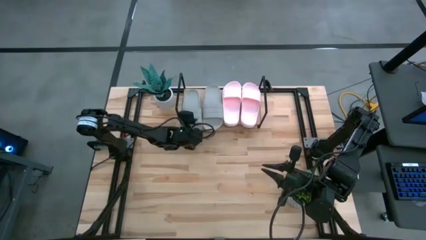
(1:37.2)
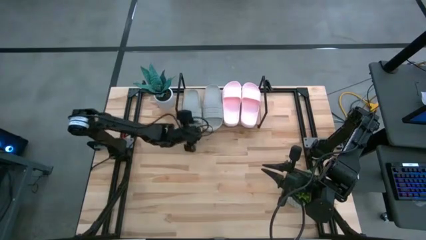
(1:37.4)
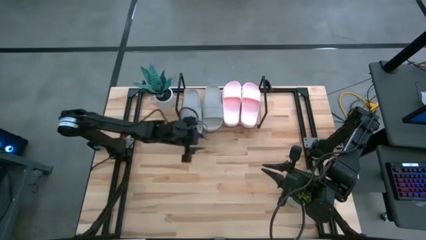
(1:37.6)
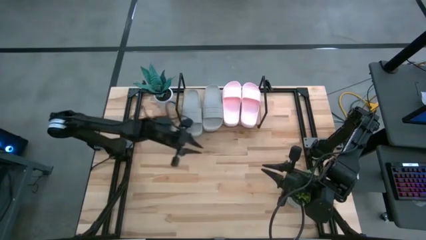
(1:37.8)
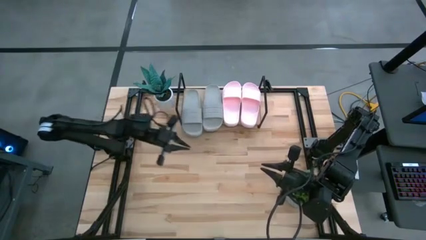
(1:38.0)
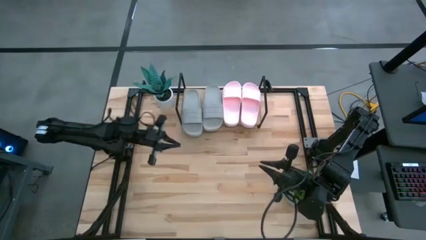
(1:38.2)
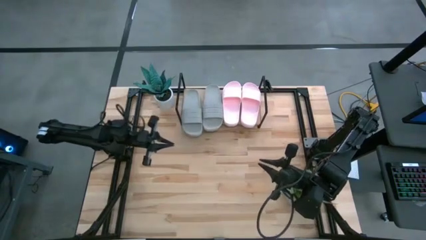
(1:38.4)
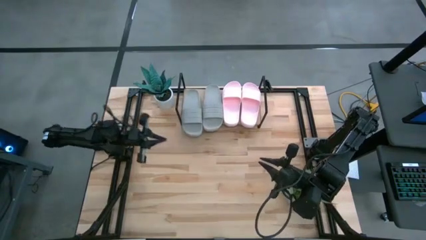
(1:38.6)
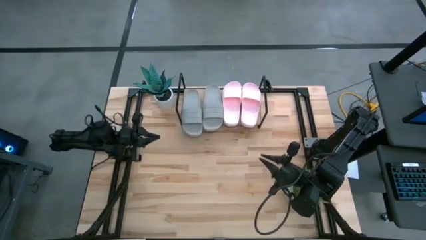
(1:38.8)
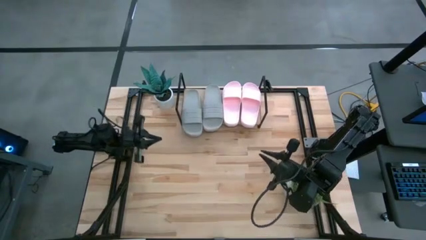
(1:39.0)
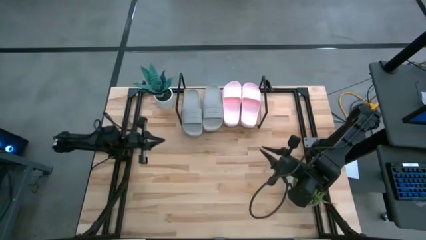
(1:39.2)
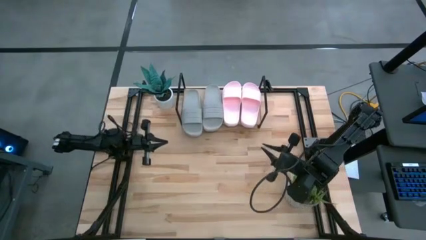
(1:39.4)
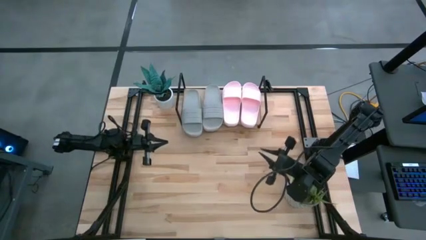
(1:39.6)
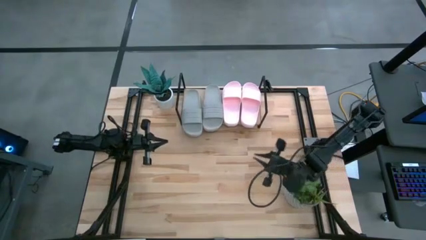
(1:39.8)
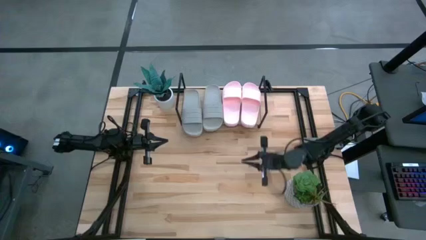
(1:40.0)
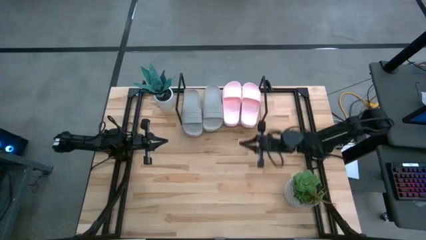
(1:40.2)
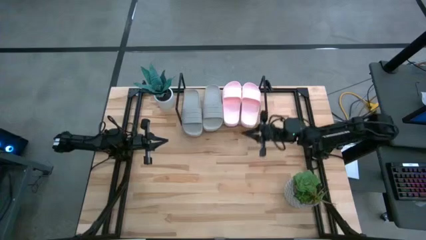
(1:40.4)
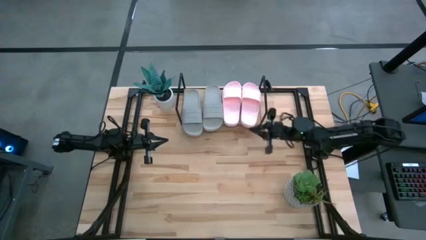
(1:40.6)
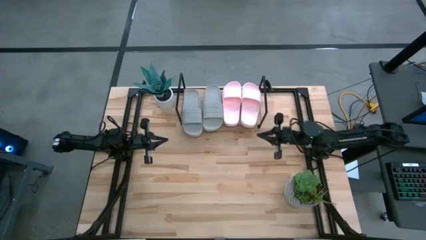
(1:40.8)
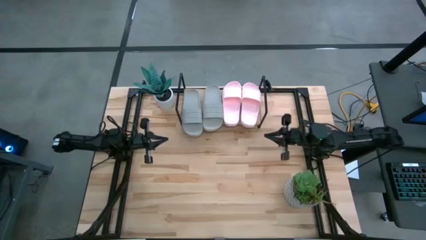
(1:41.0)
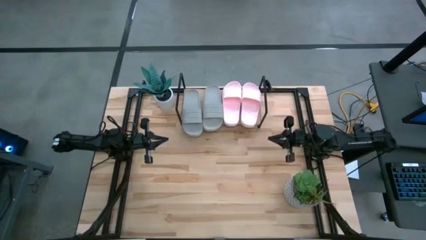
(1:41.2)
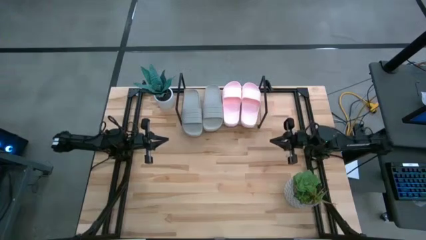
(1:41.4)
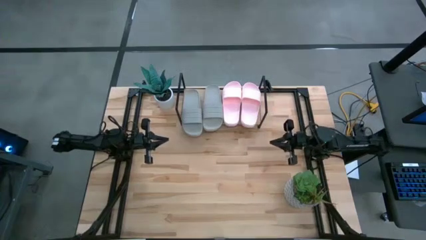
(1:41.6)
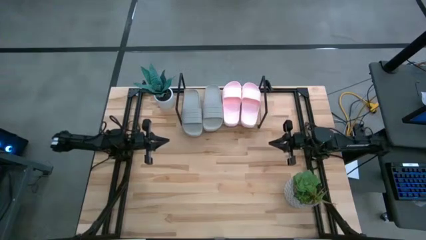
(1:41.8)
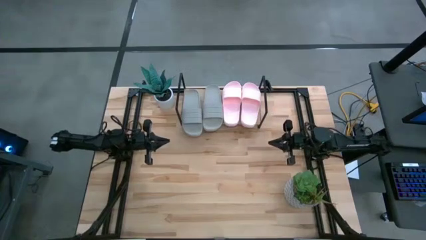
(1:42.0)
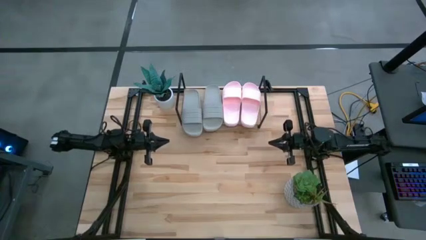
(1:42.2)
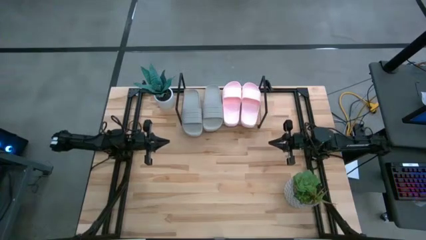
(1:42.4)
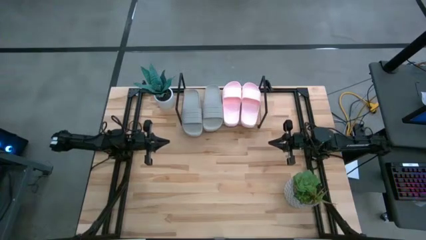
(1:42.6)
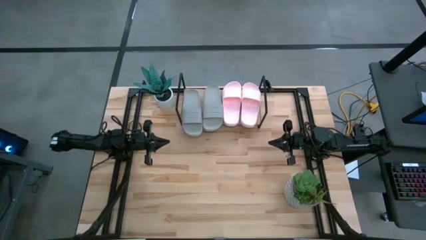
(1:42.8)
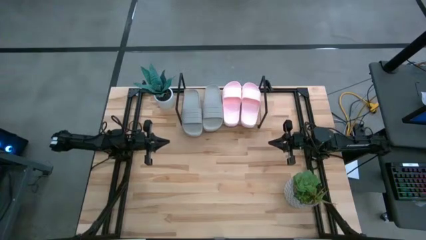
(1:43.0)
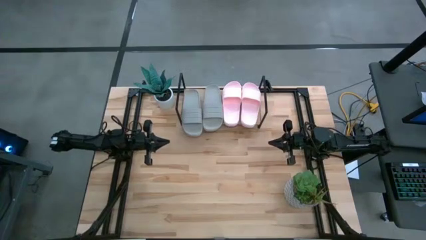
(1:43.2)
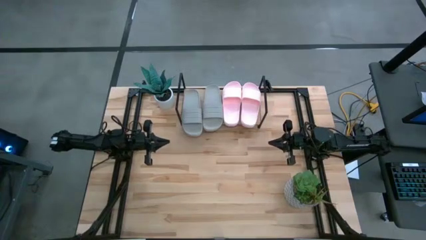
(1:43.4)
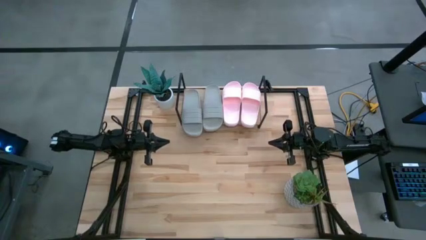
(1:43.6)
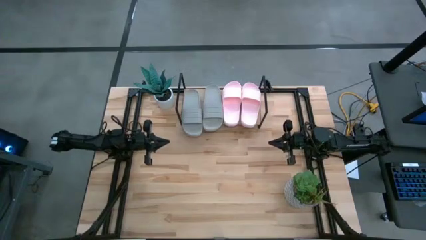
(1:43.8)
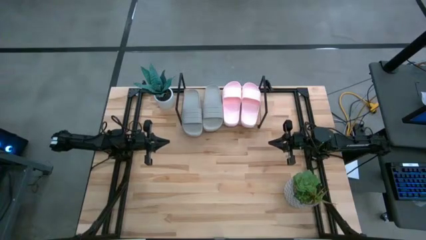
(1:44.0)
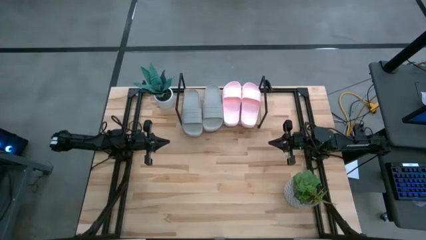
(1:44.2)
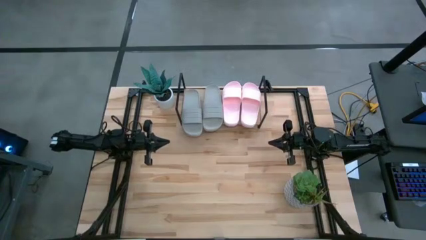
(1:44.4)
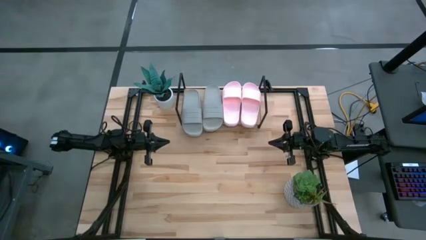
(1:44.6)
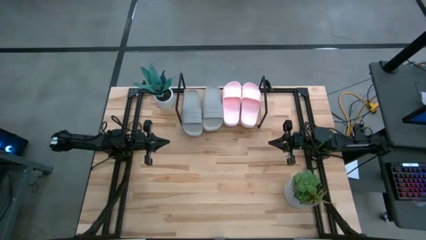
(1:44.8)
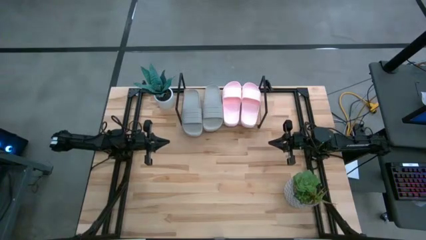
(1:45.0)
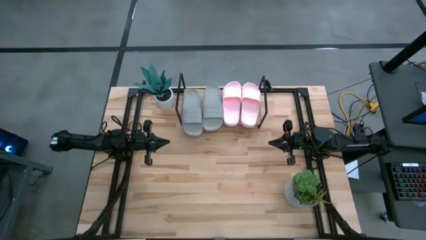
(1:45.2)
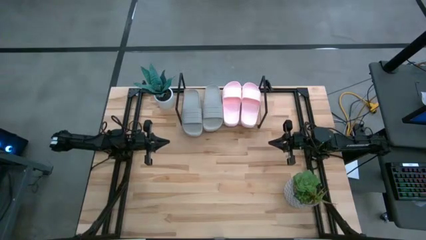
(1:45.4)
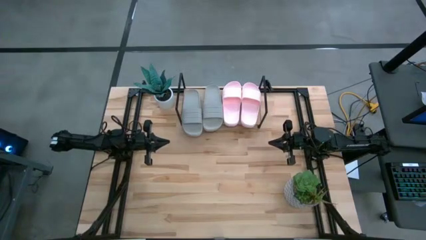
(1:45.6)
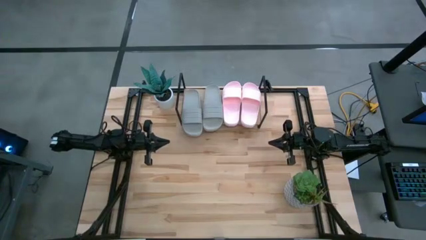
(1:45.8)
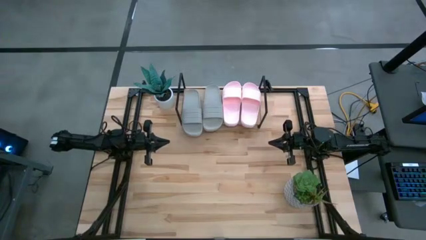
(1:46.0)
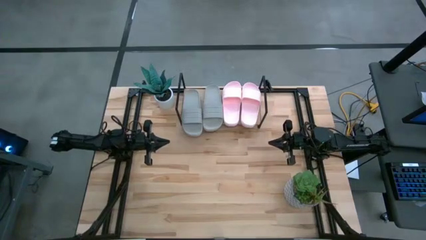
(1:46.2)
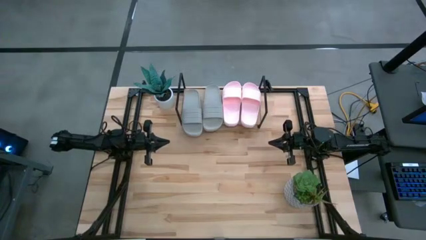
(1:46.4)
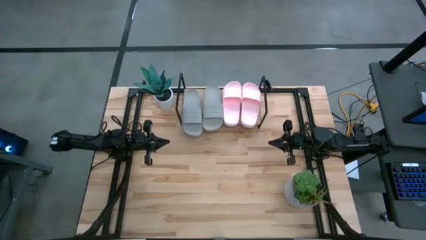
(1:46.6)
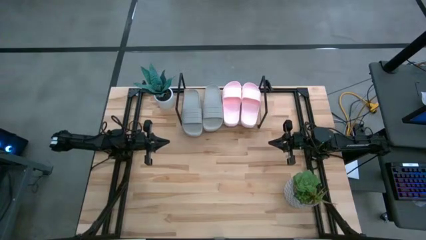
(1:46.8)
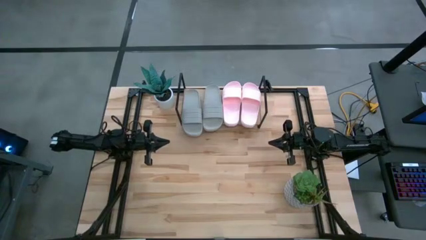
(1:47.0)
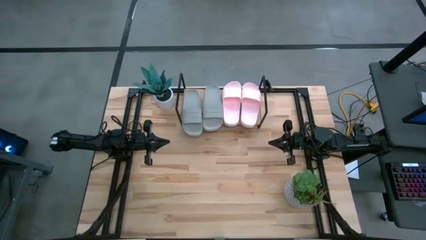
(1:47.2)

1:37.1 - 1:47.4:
Task: Pick and place slides into the shelf
Return to Home Position

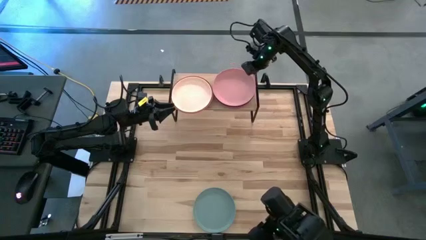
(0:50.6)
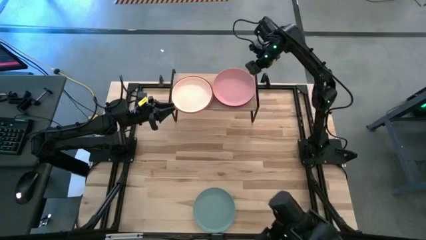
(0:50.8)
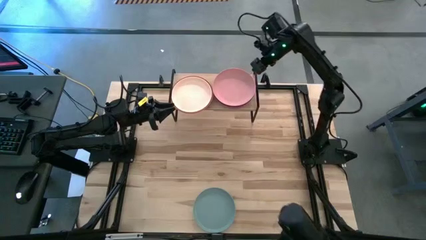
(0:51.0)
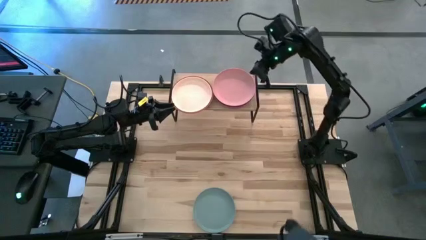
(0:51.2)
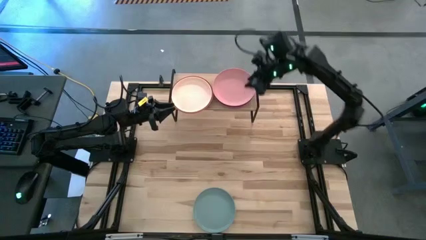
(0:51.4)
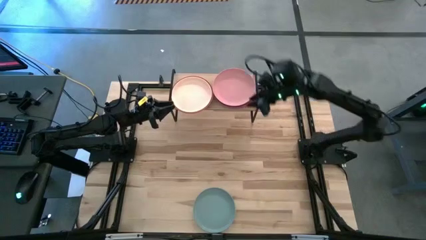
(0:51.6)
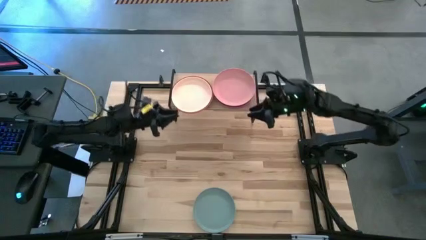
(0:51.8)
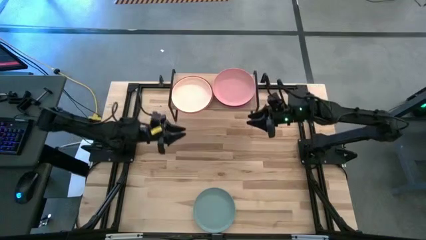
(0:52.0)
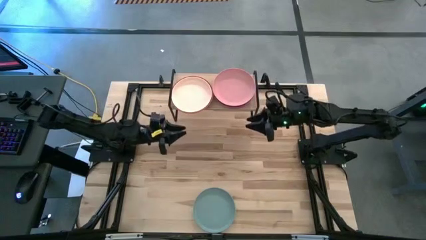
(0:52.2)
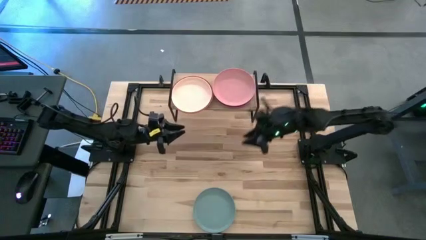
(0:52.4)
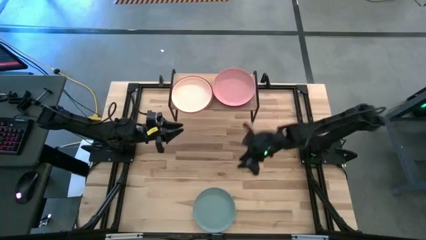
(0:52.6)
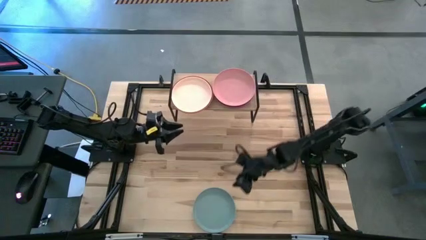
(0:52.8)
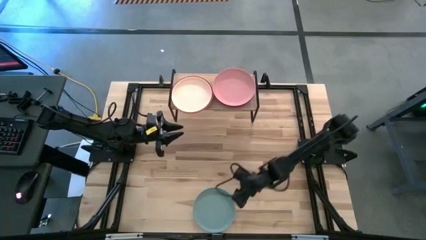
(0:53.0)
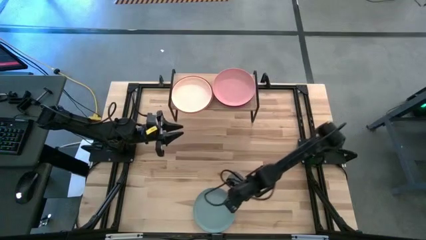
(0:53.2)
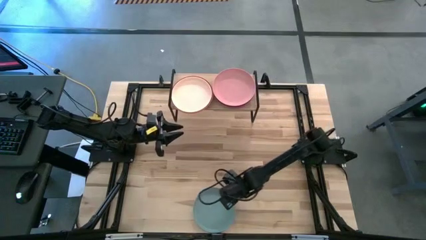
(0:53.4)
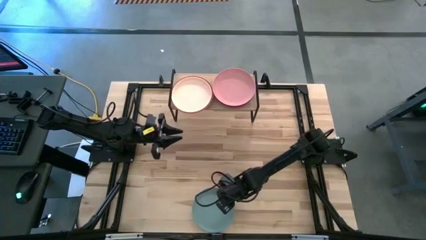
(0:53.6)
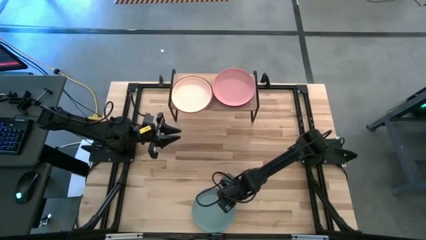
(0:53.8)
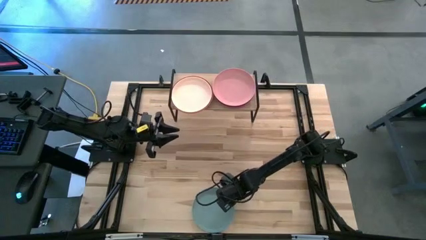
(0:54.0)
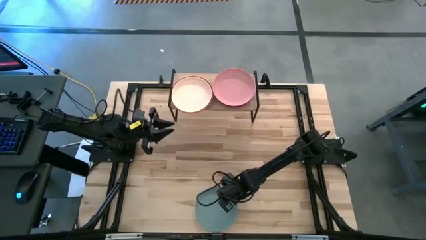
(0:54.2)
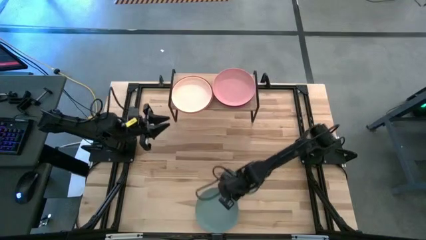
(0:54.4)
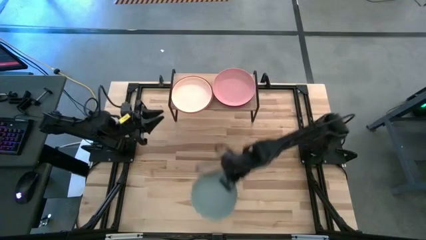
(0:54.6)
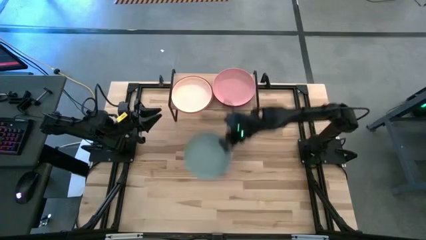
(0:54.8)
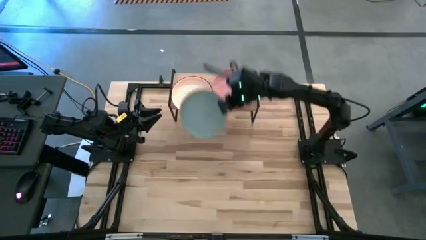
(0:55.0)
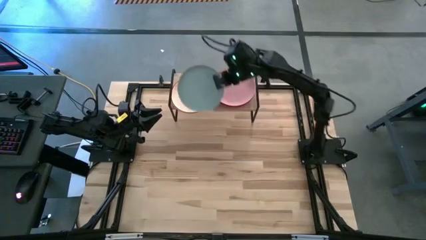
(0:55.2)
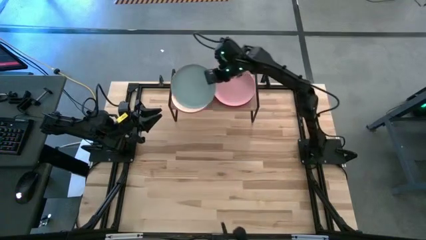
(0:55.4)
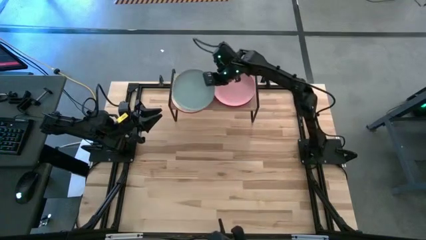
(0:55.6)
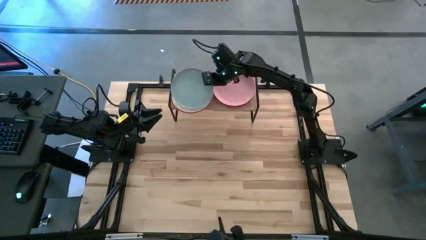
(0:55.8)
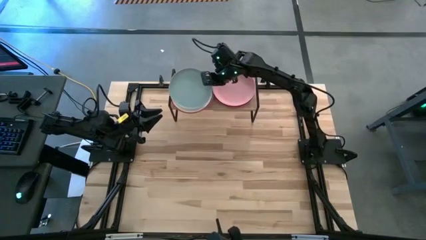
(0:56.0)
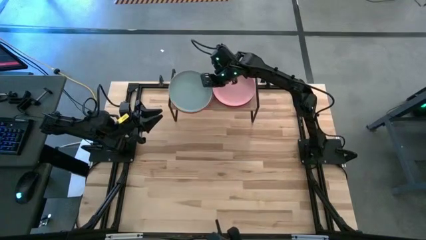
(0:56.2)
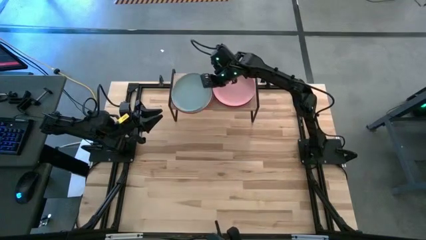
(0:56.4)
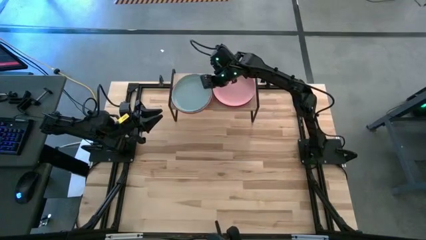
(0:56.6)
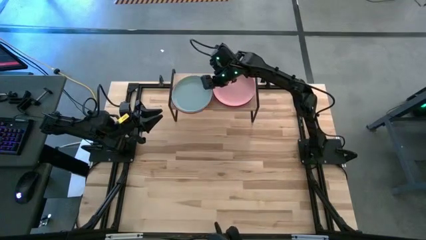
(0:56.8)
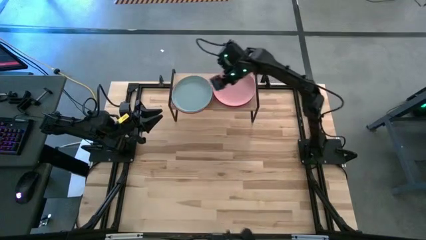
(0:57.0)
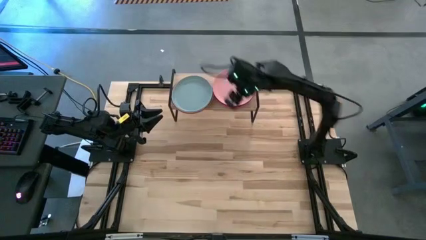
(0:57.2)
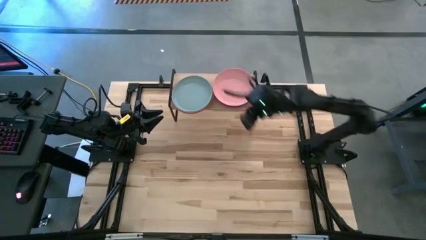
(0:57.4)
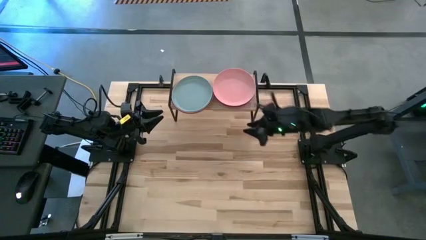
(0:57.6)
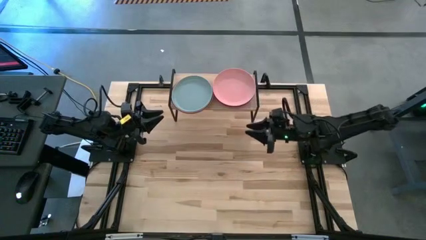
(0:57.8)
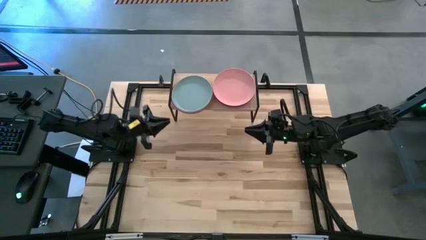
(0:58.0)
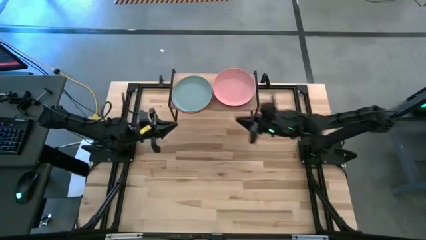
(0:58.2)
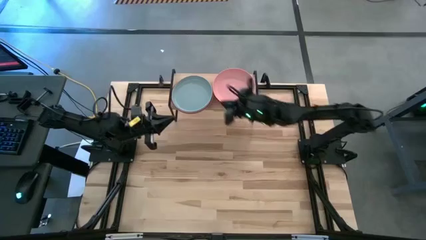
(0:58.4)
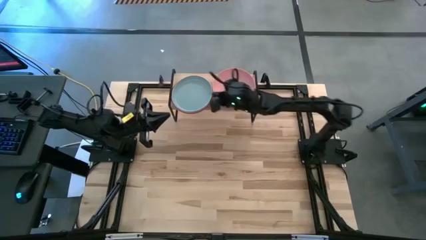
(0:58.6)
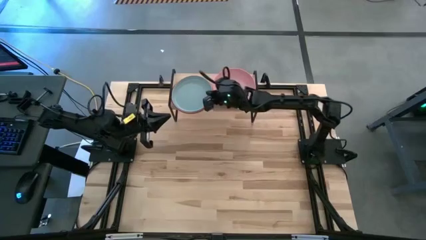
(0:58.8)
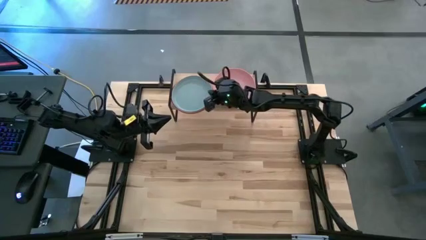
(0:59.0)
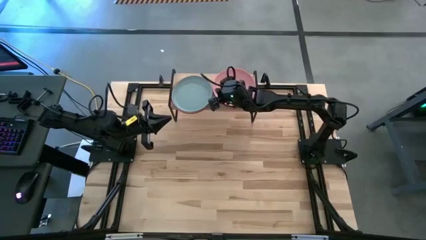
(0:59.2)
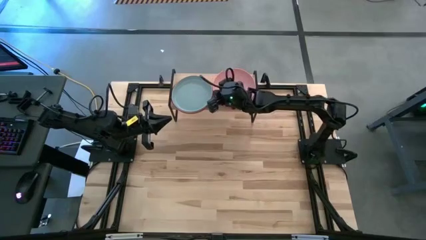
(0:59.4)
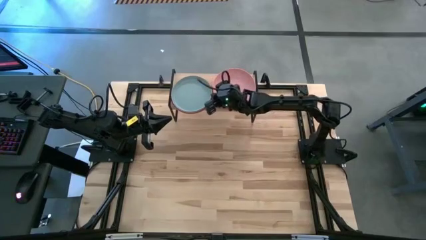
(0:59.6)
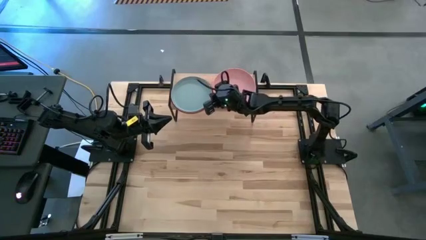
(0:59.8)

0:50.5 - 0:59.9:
Task: Place and stack plates onto a shelf
Stack the gray plate on top of the light orange plate on the shelf
